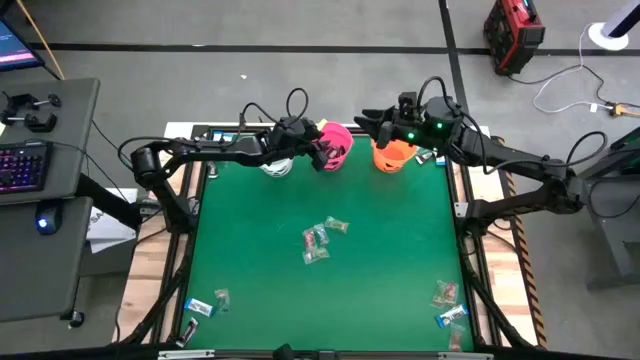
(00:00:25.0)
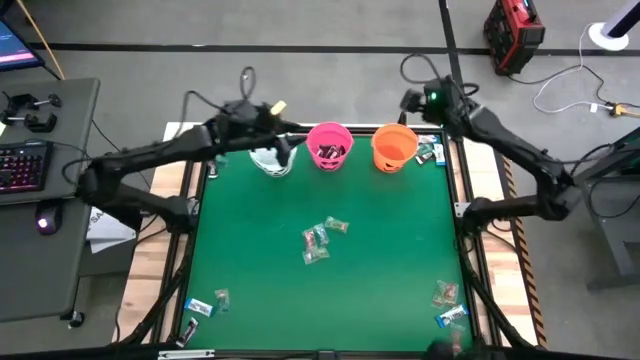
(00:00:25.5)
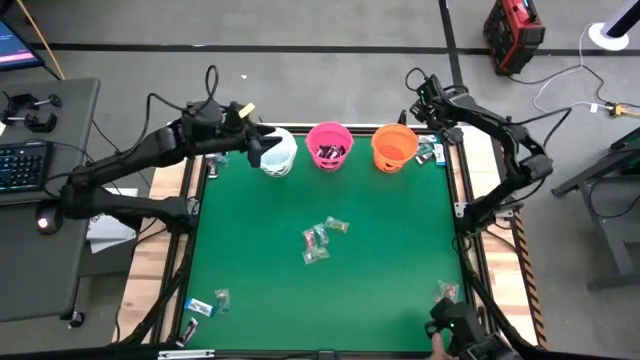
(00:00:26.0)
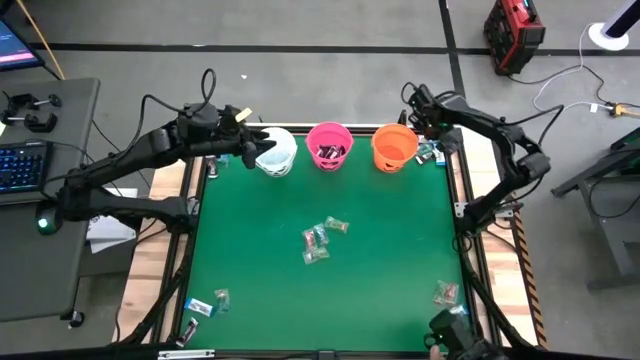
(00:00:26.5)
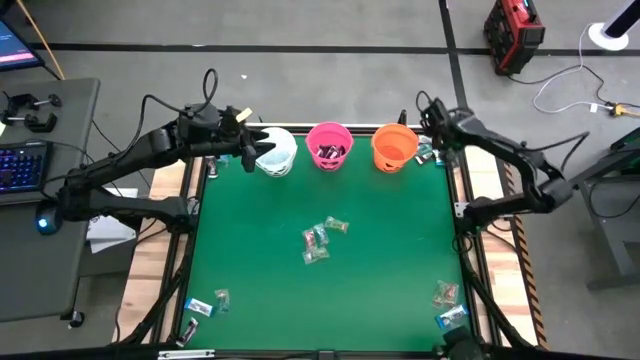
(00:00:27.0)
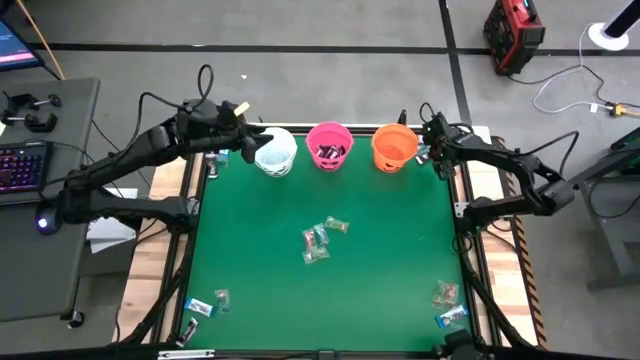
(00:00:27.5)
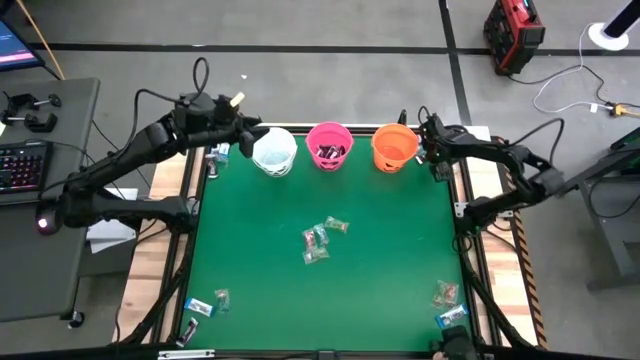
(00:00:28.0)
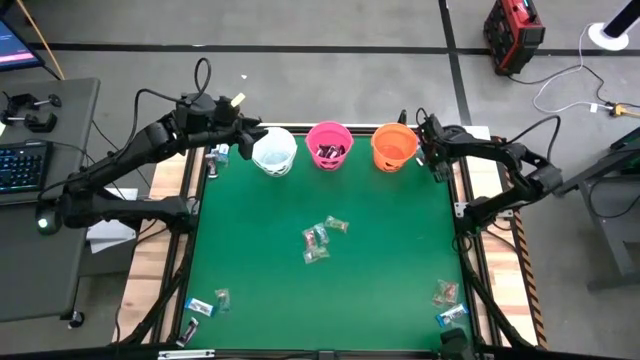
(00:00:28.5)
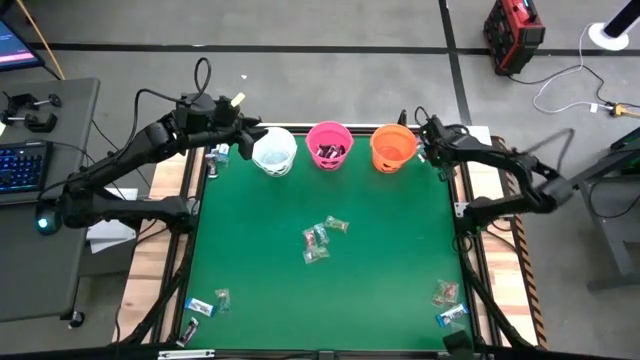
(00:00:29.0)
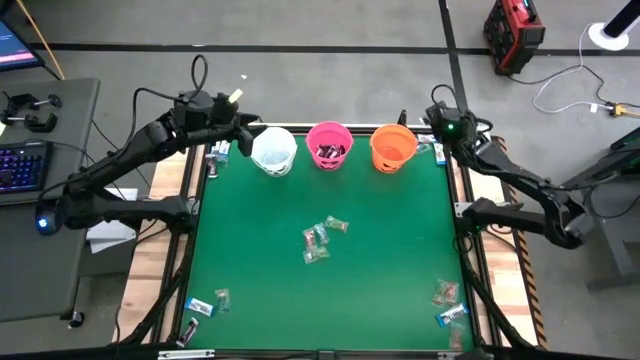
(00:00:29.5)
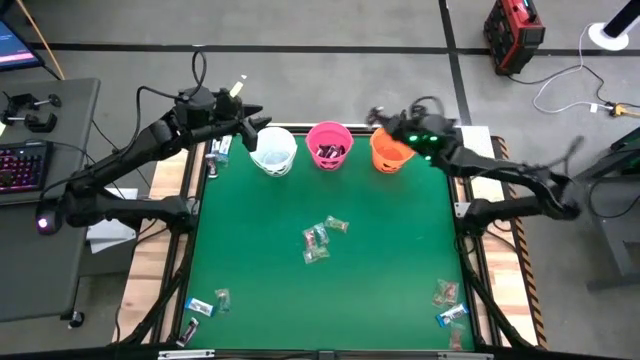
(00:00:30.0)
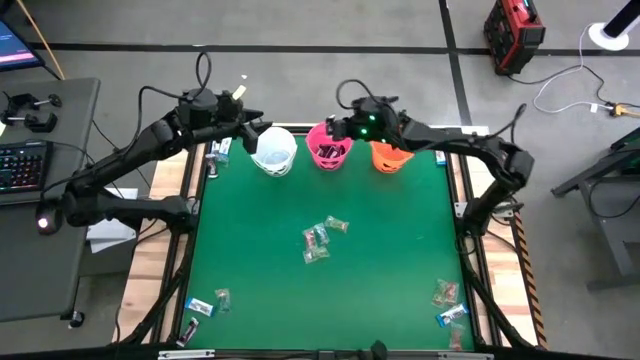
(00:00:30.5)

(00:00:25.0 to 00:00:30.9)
Task: Sort candy by brand, put in halloween buckets
Put the brown chocolate into the pink bucket

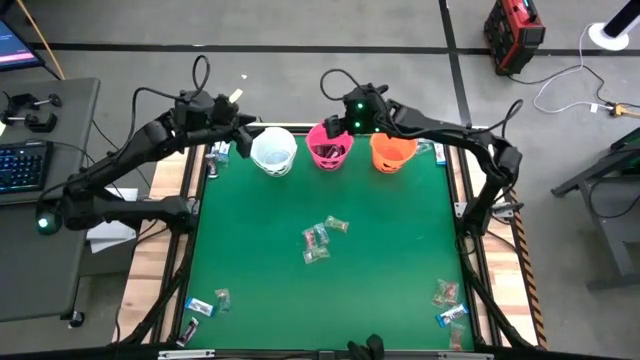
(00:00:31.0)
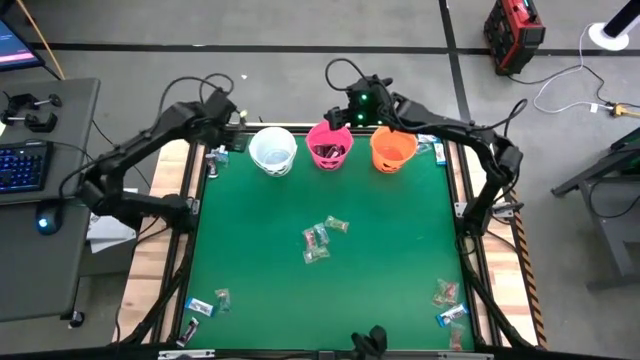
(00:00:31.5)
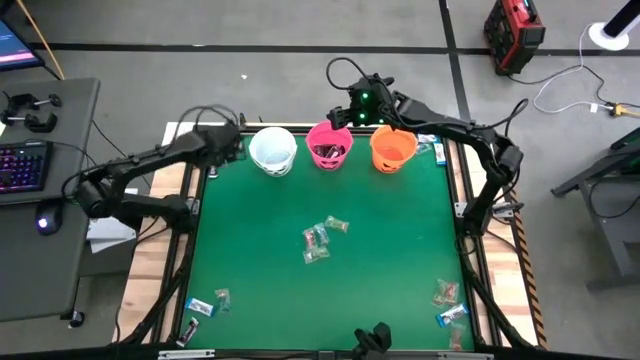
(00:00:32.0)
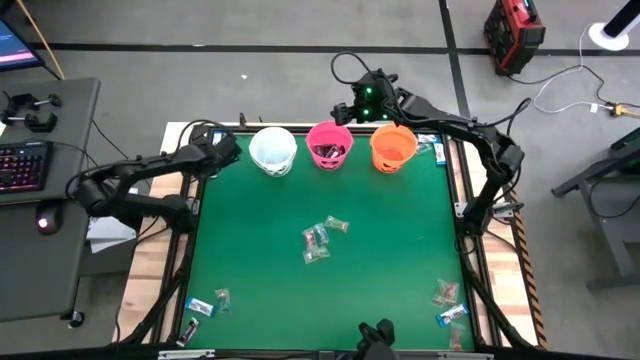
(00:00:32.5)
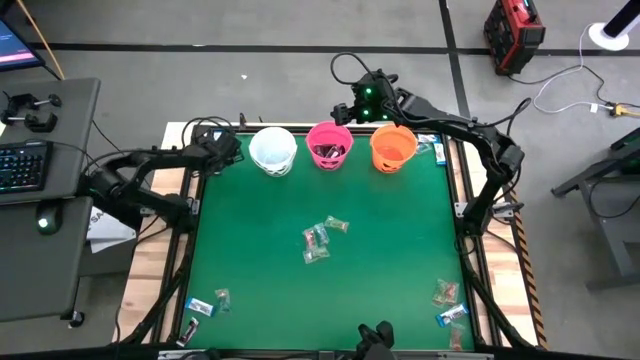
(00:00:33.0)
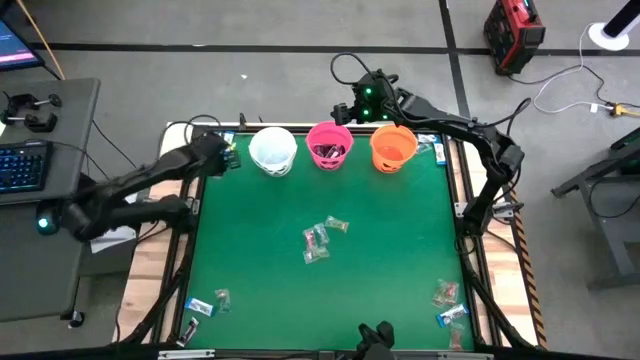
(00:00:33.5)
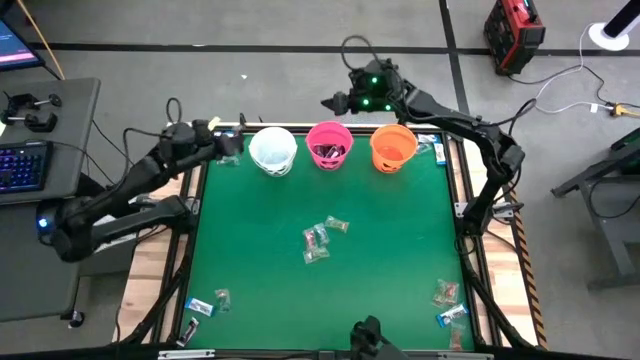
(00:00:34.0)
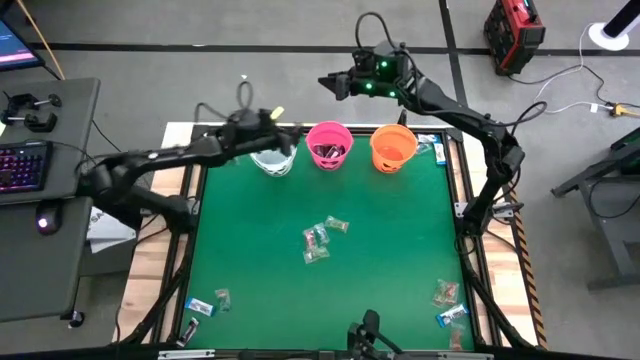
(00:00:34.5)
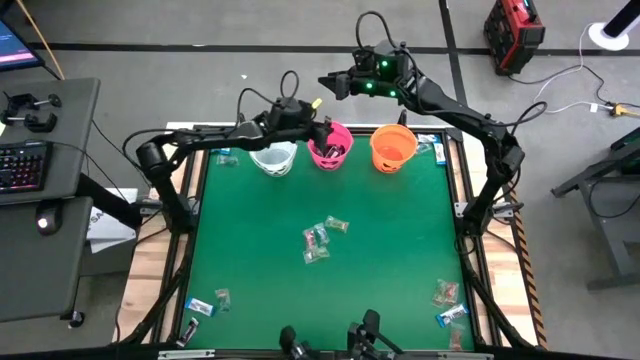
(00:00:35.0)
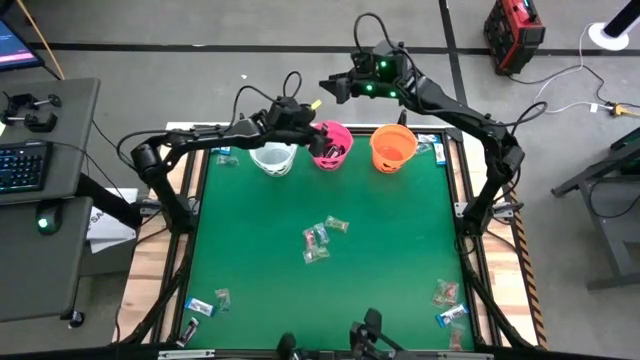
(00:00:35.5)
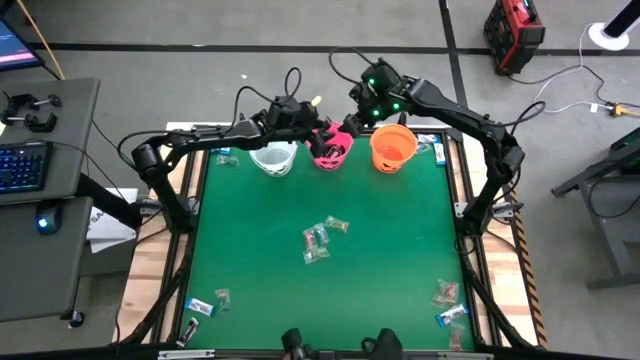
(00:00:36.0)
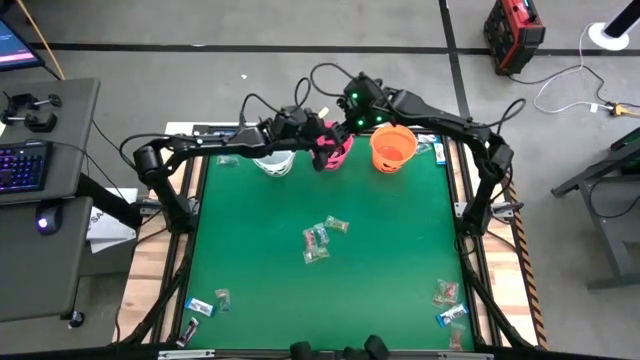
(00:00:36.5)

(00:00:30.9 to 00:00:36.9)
Put the brown chocolate into the pink bucket

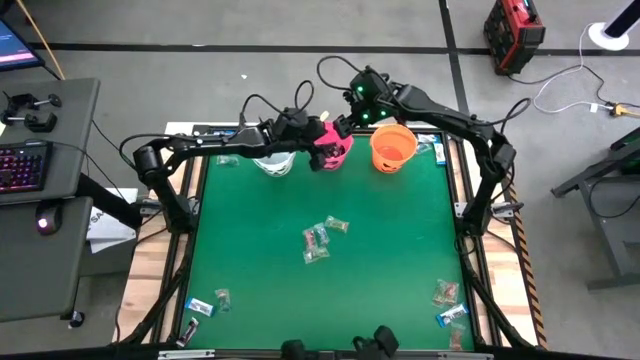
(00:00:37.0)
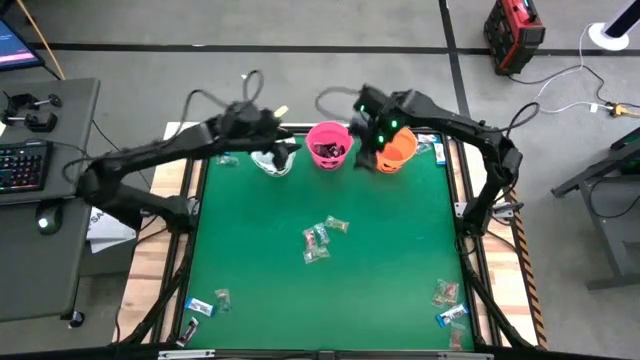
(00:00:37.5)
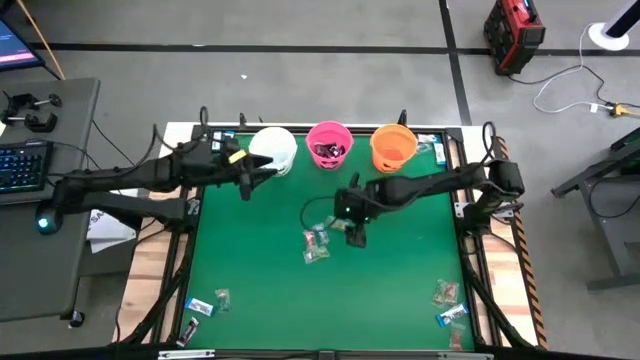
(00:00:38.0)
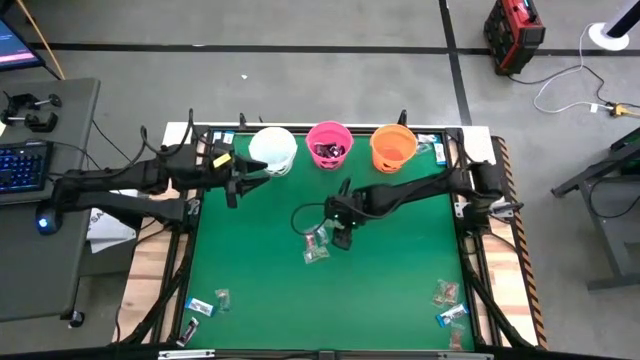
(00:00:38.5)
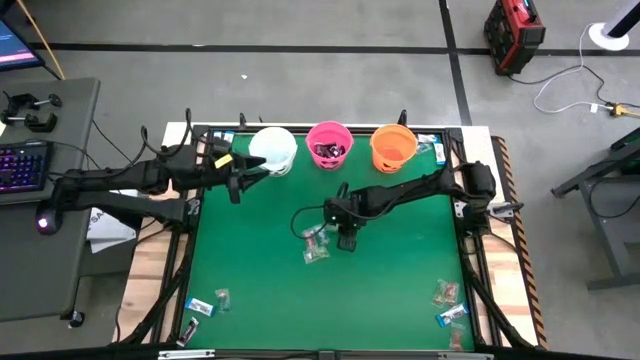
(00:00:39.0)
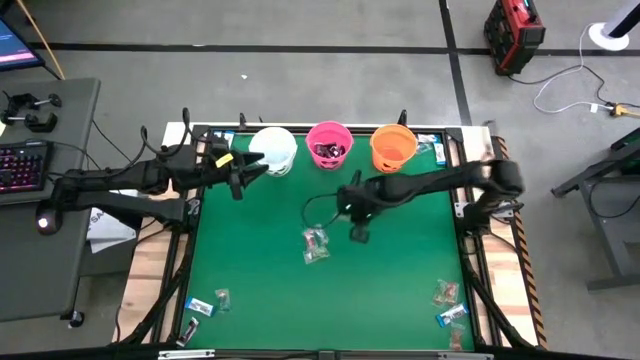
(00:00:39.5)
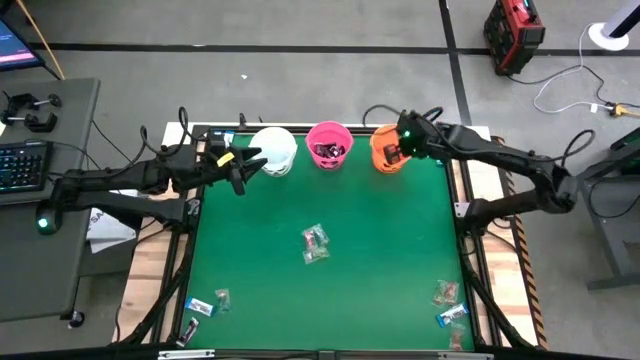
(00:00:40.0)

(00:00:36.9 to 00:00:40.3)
Put the green gummy into the orange bucket

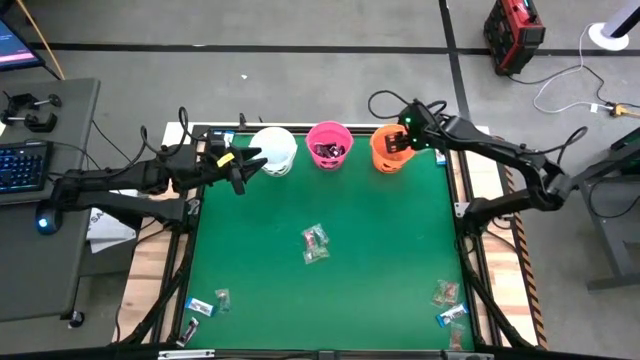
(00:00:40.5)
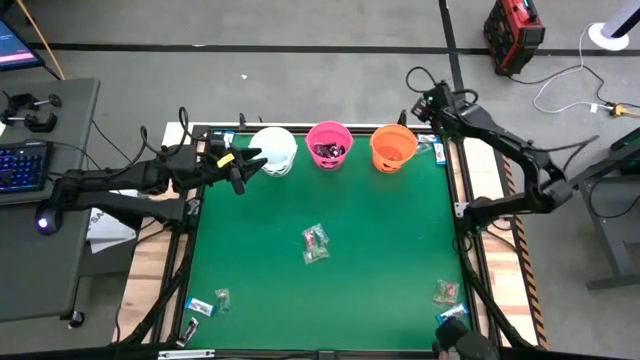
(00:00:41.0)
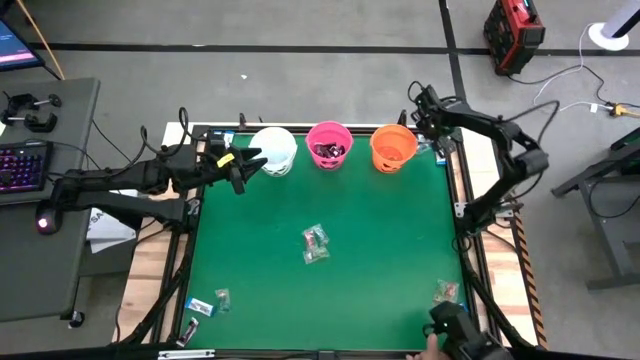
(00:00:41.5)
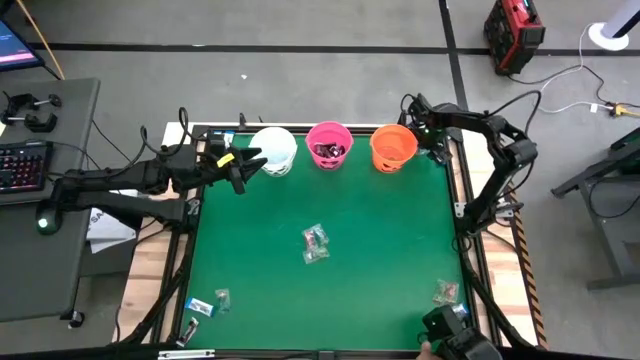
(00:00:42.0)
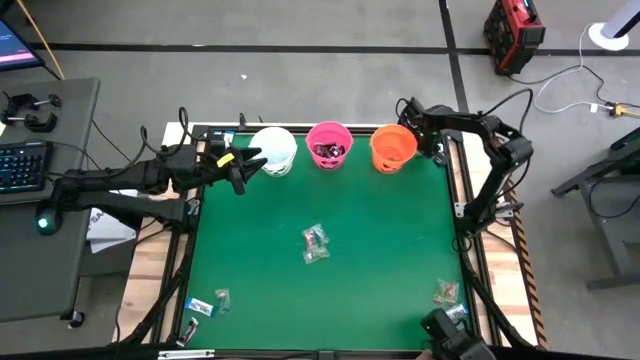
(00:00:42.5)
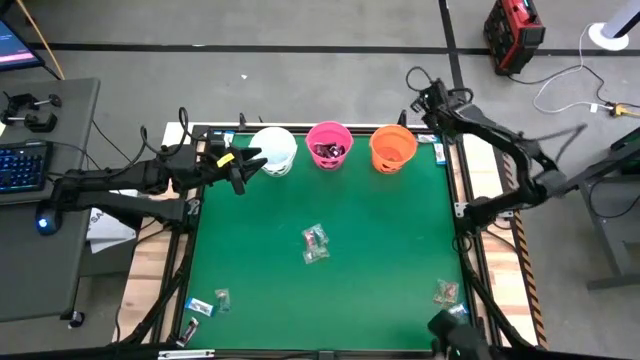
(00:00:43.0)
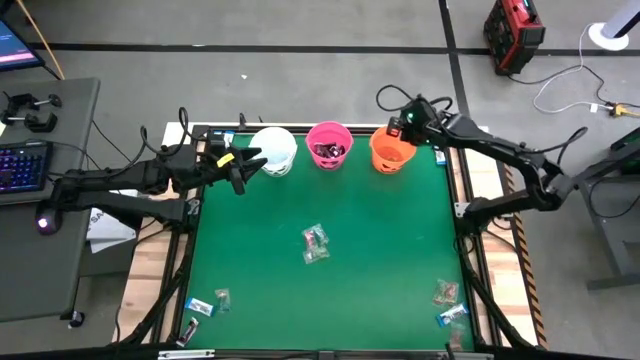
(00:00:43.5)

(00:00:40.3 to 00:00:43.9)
Put the blue gummy into the orange bucket

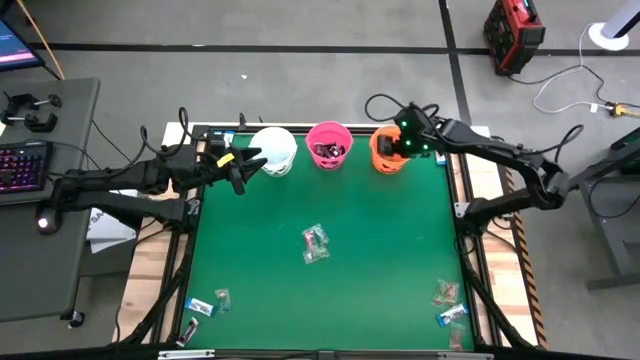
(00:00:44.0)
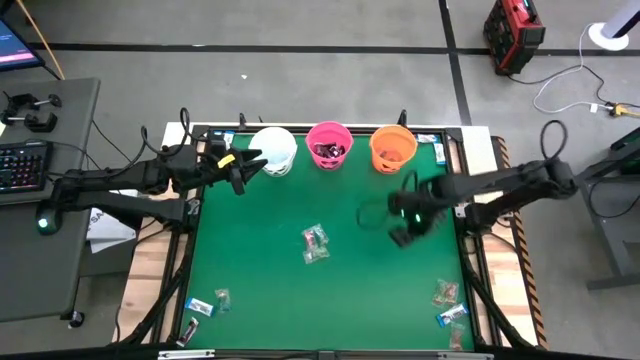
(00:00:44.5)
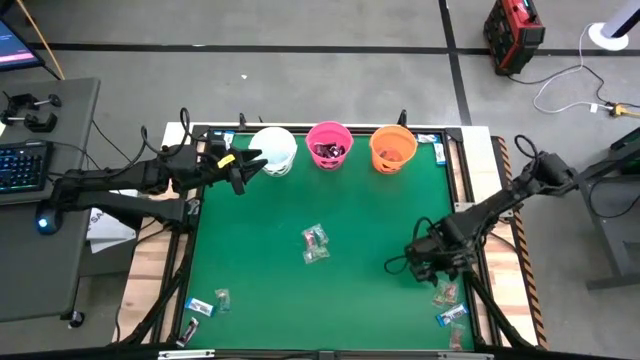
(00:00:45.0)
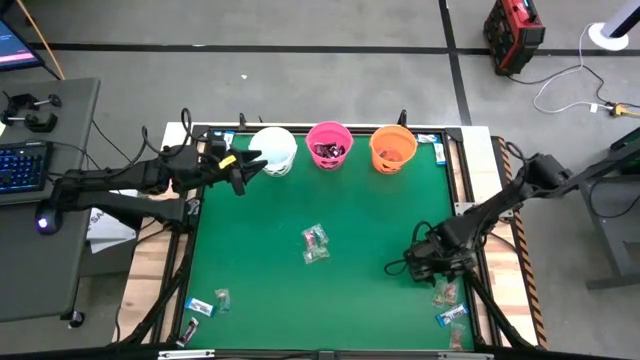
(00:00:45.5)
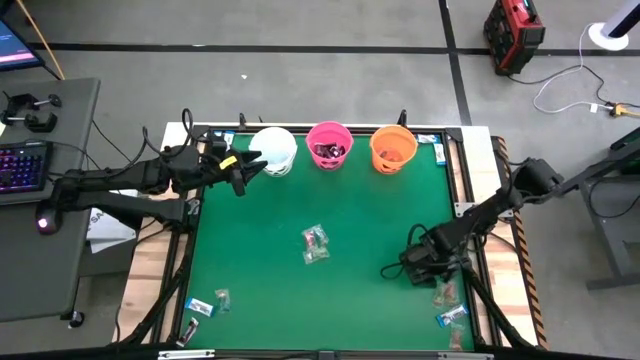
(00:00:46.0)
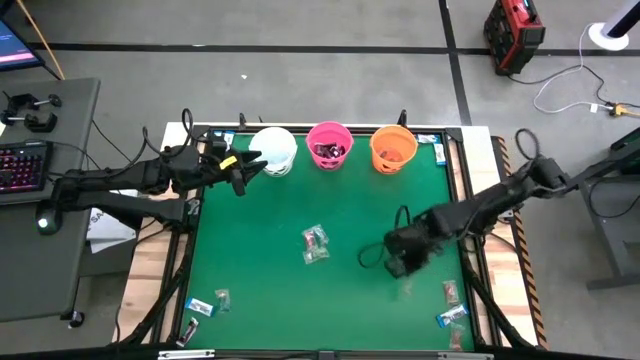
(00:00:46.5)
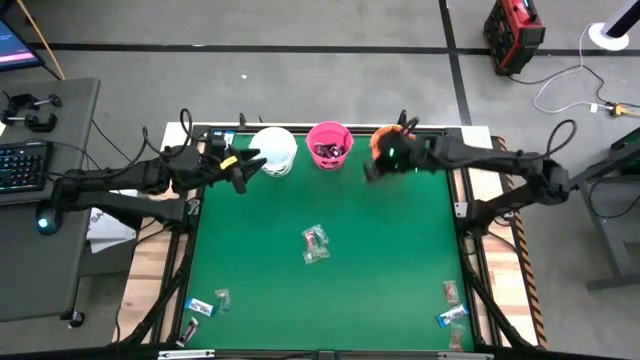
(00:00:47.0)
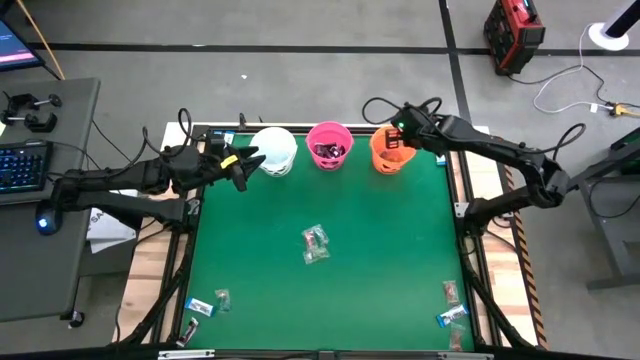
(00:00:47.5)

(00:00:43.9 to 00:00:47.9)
Put the green gummy into the orange bucket
